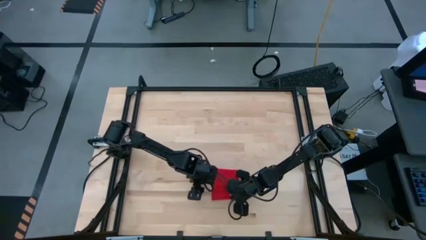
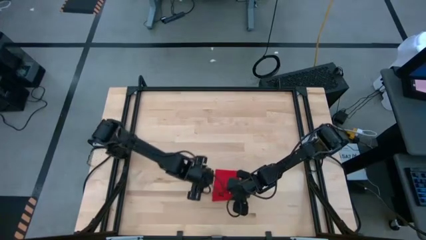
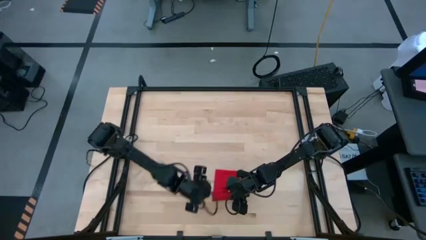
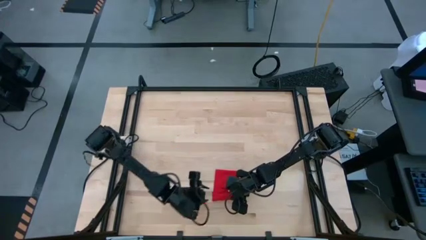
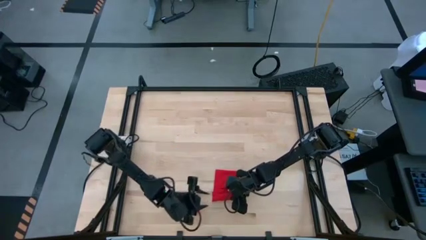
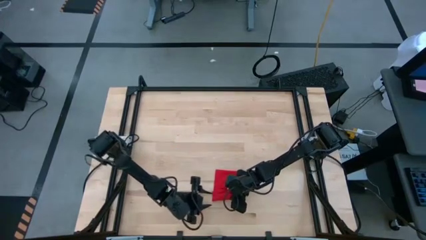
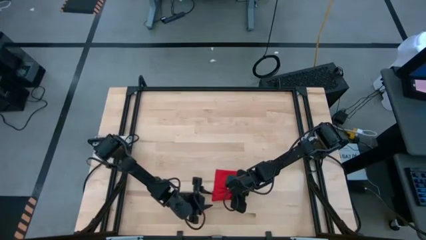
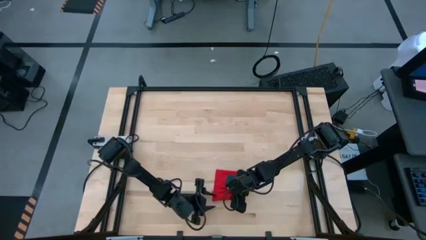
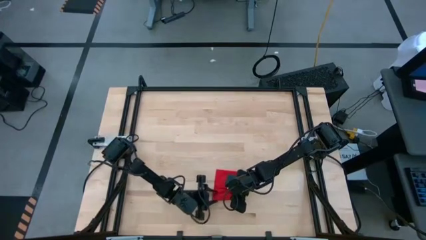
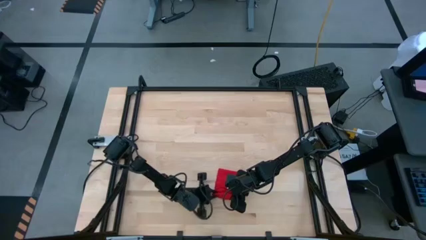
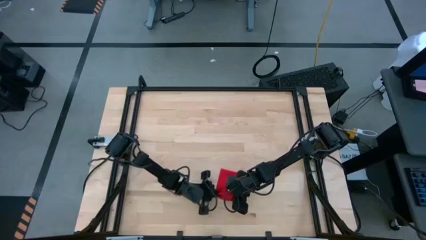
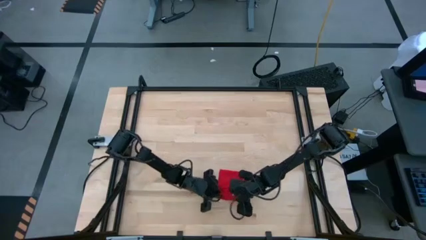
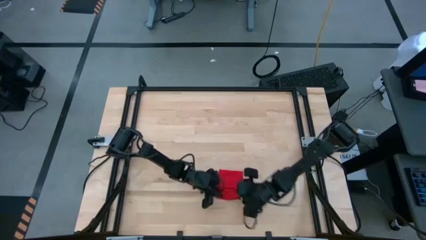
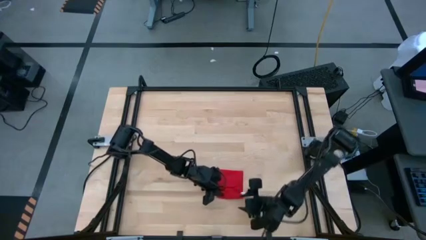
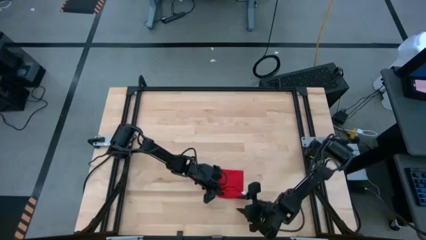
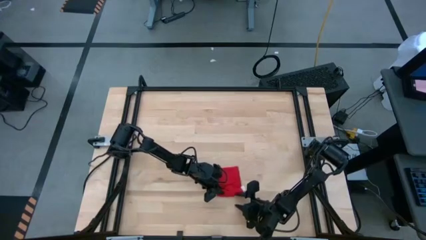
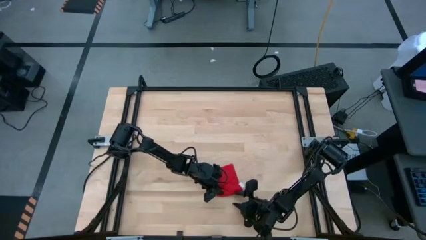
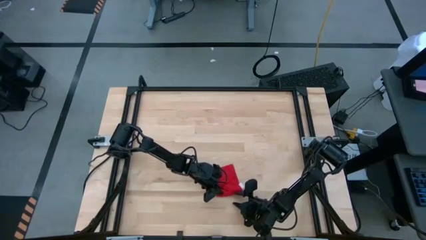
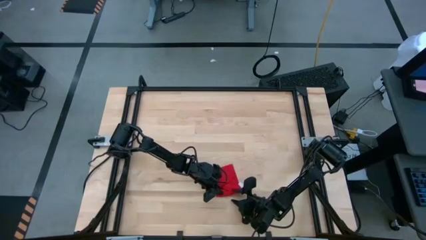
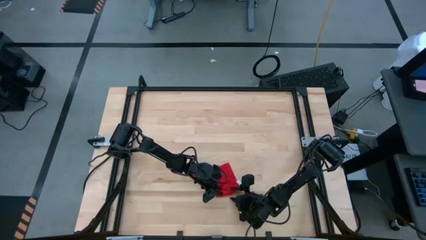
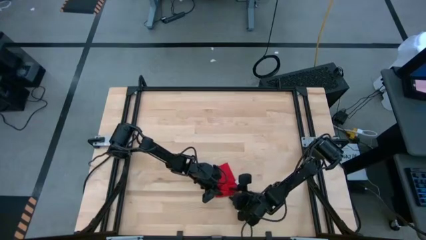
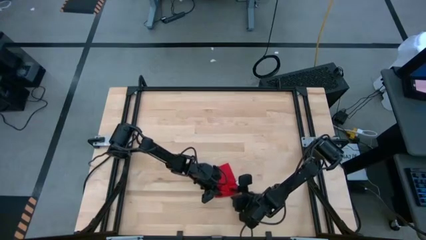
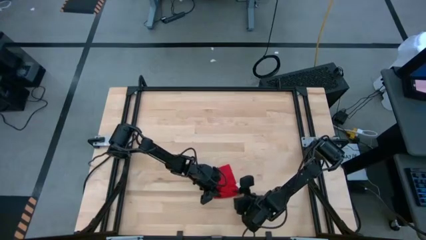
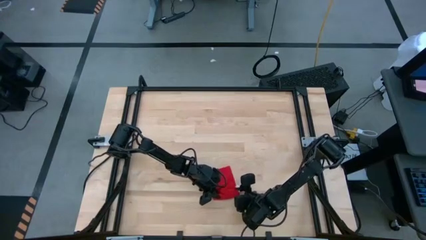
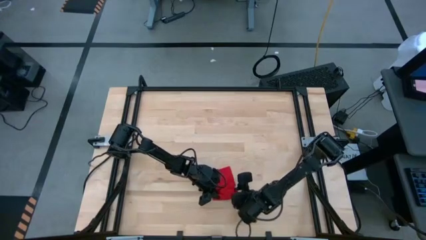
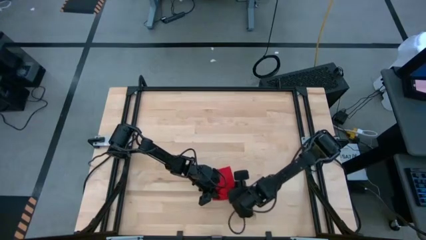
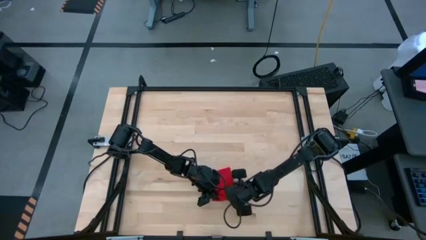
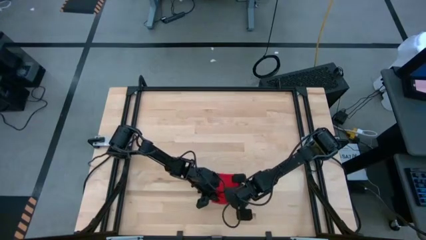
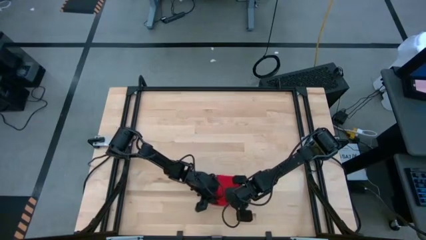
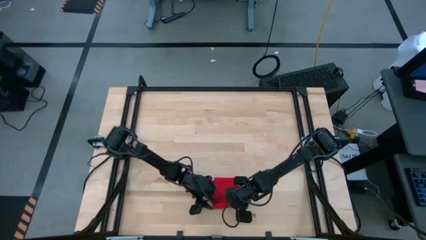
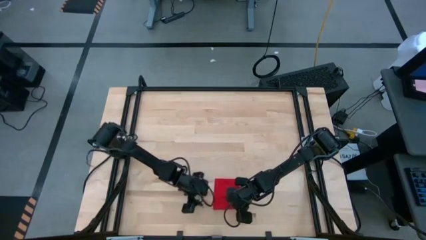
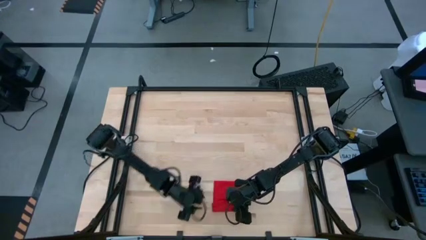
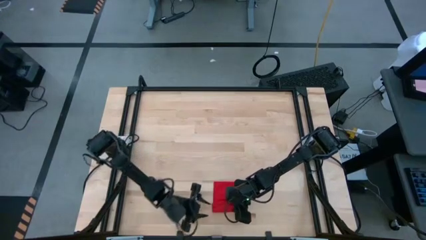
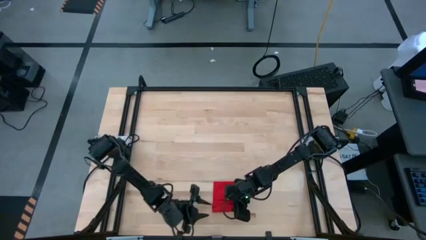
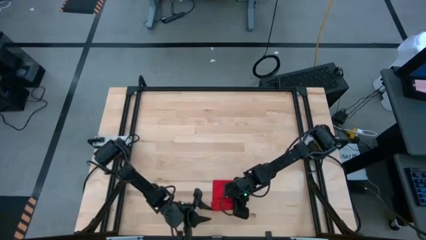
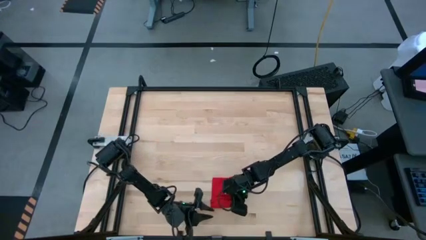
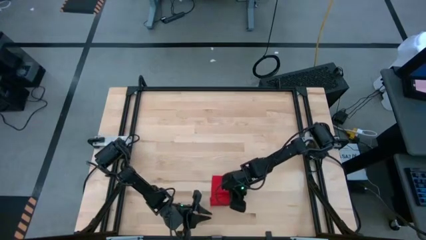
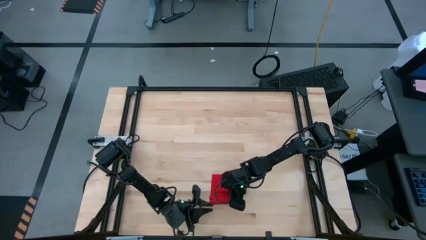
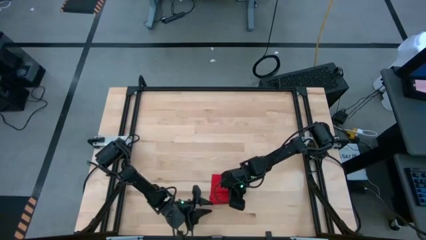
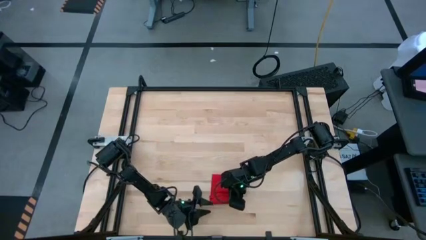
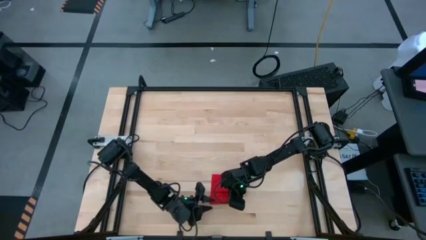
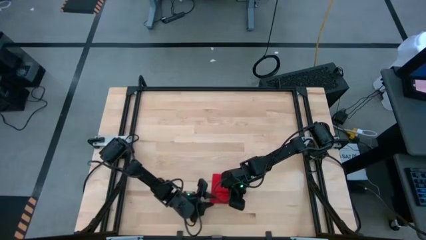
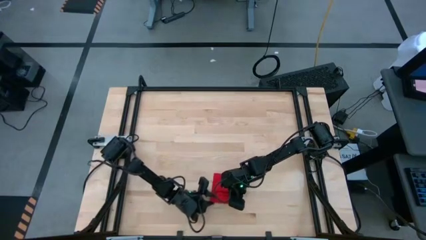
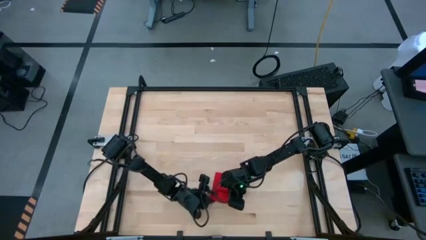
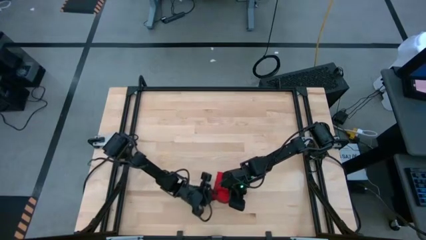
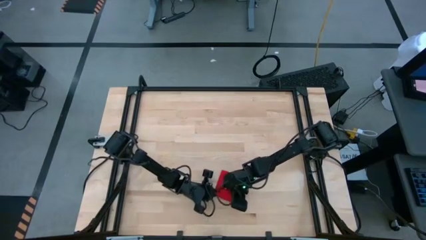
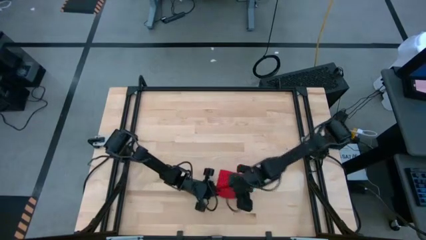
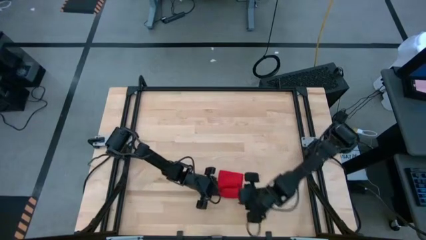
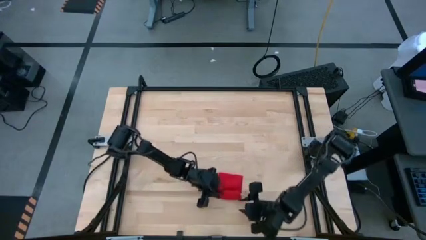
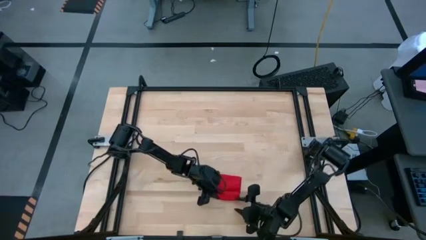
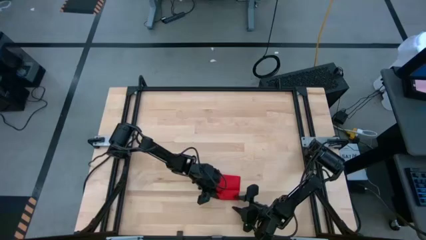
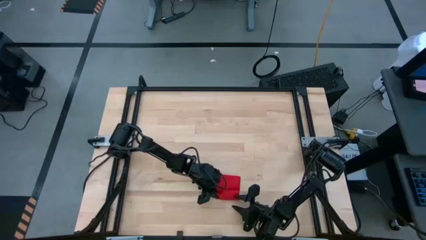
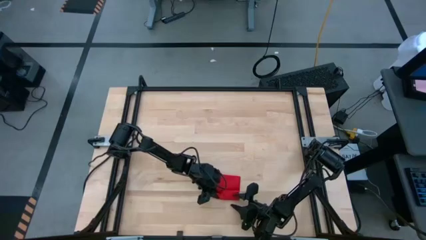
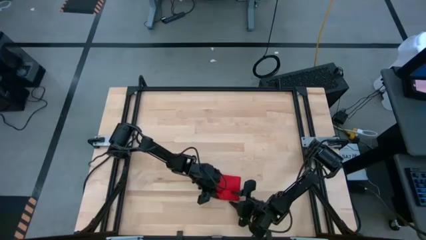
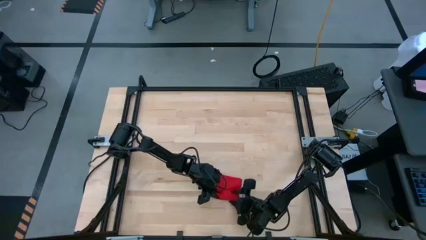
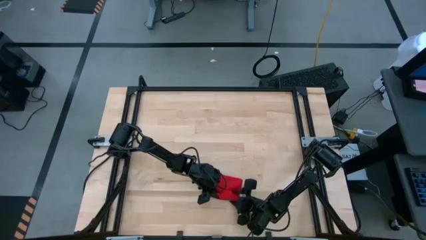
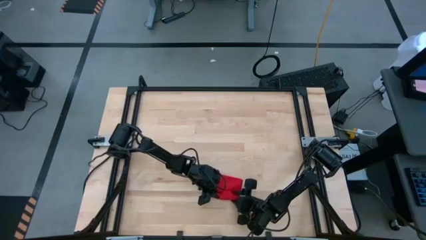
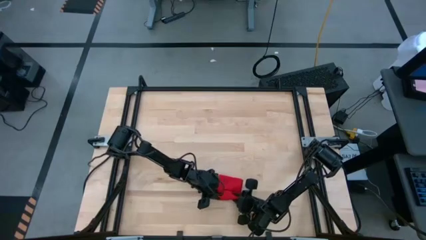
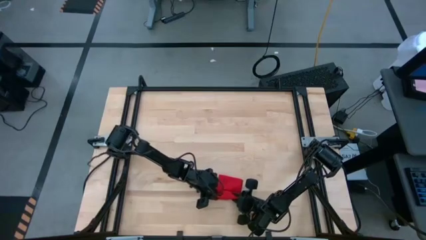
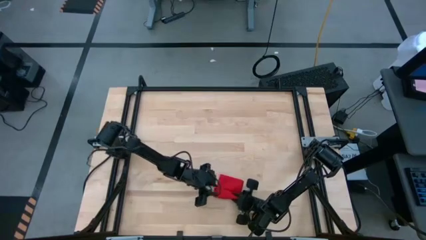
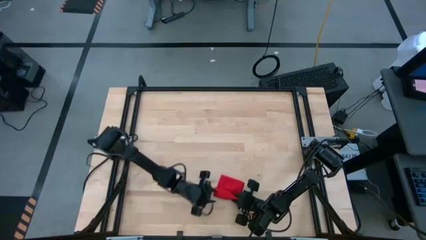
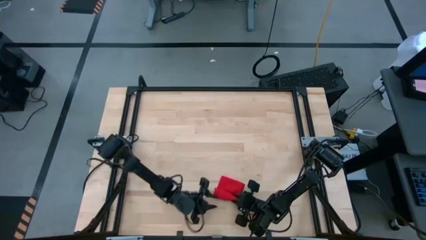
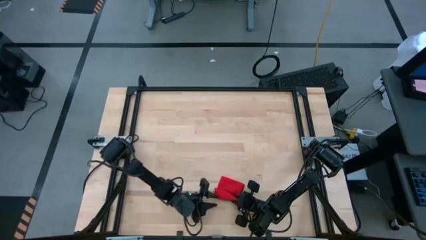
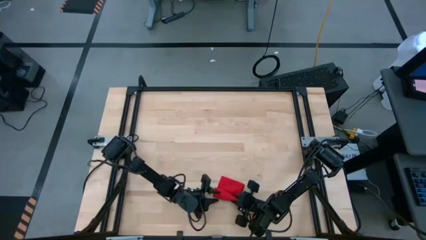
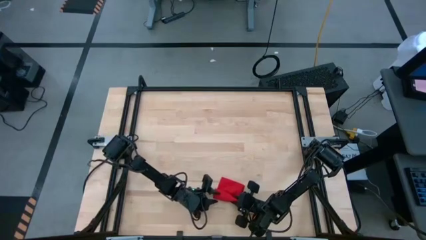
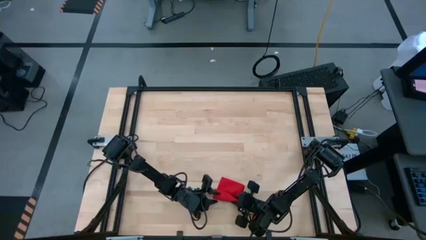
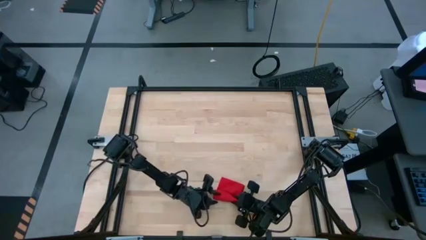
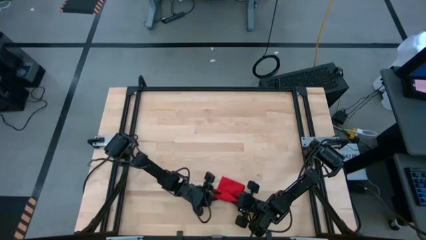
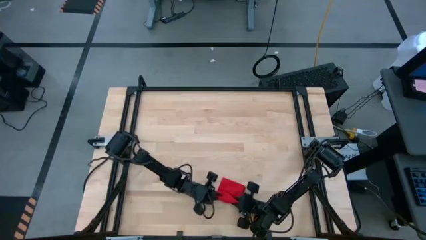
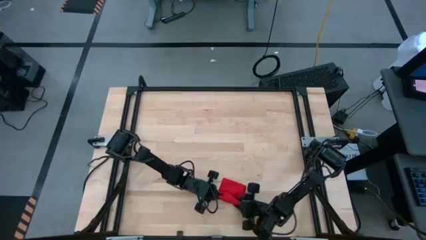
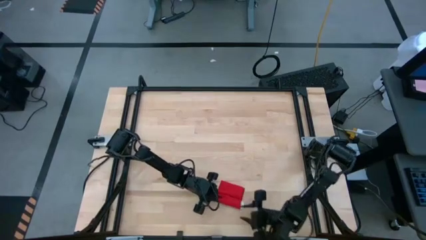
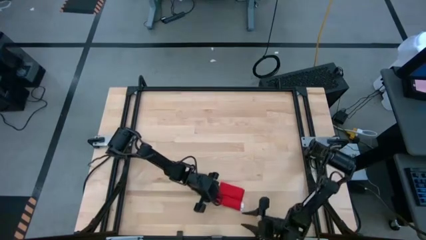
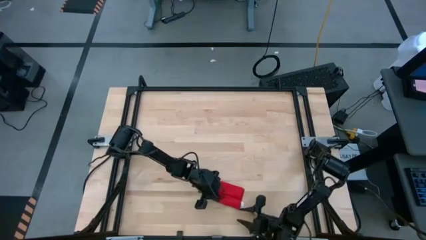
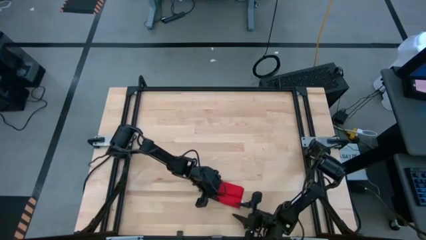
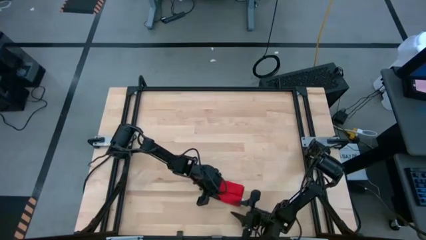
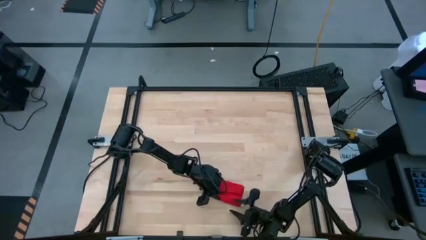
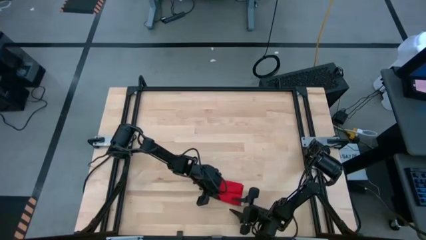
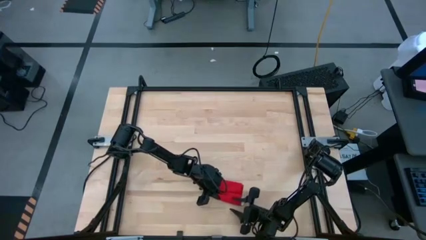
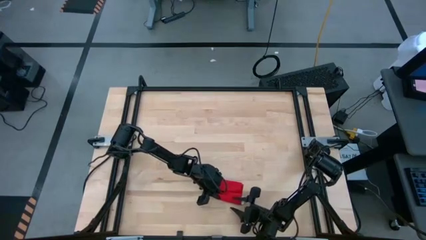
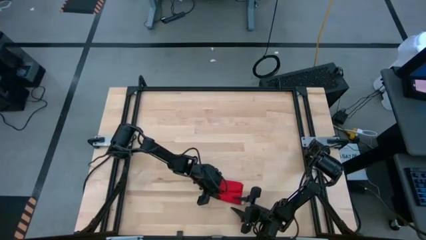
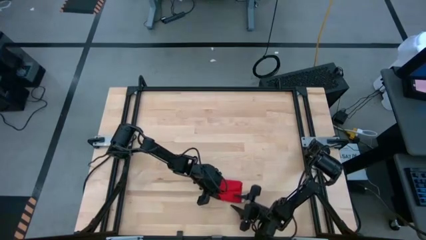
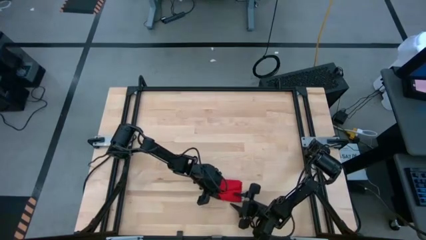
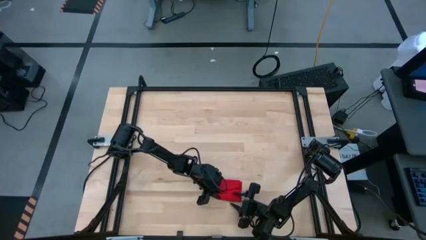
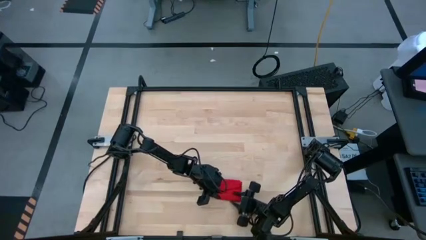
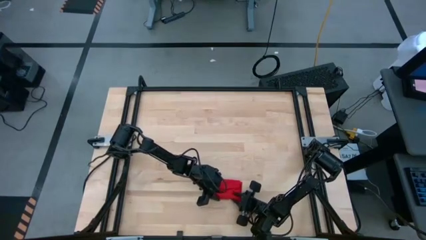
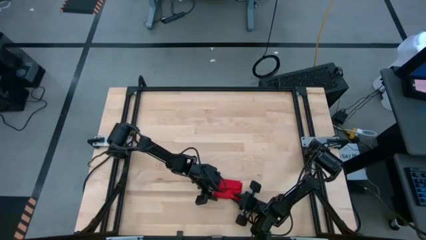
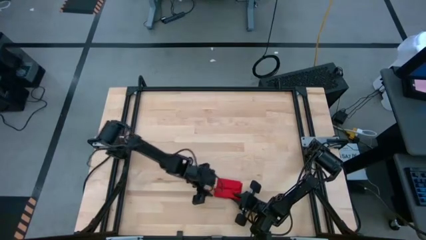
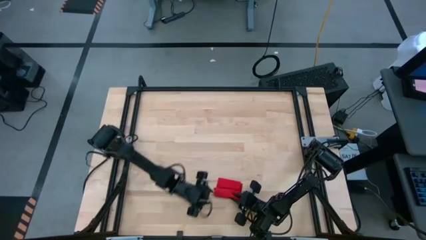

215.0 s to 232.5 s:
Task: Roll napkin
Roll the red napkin
